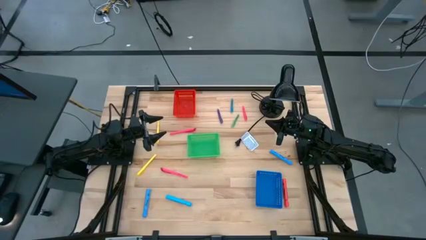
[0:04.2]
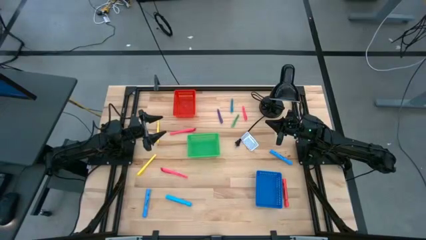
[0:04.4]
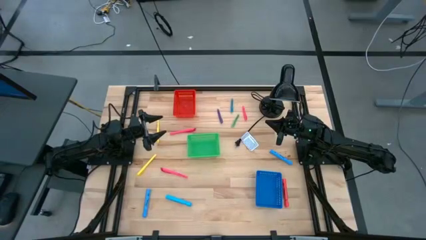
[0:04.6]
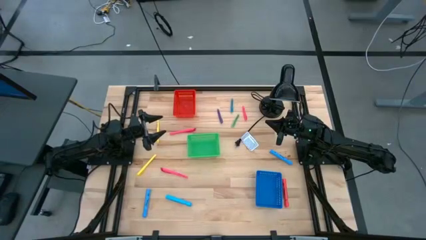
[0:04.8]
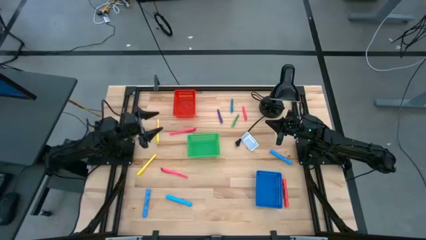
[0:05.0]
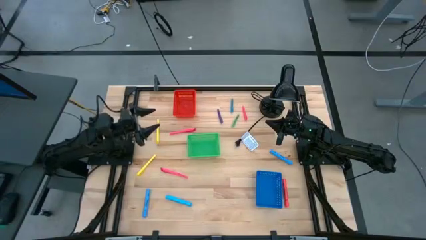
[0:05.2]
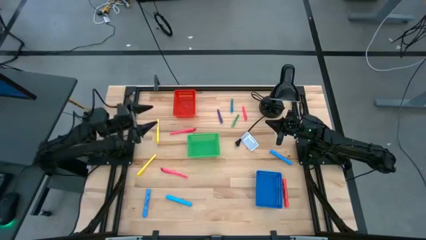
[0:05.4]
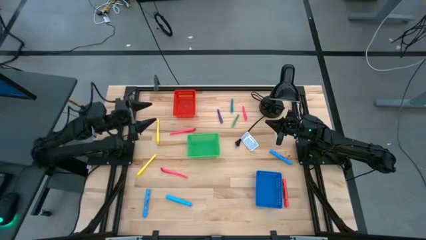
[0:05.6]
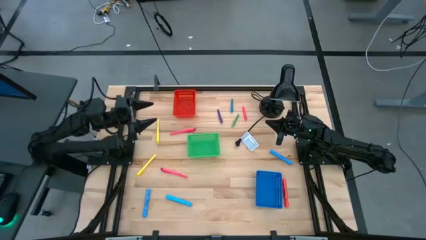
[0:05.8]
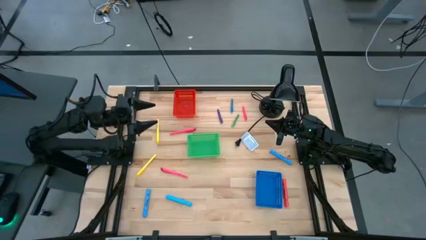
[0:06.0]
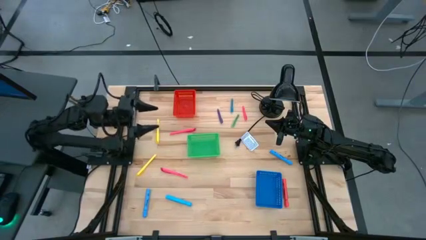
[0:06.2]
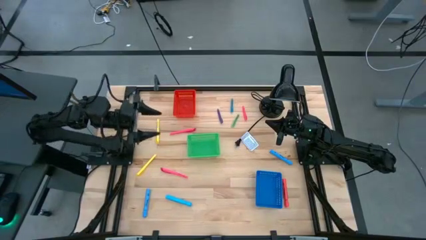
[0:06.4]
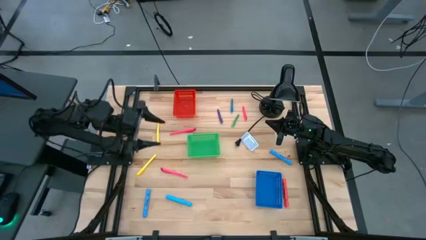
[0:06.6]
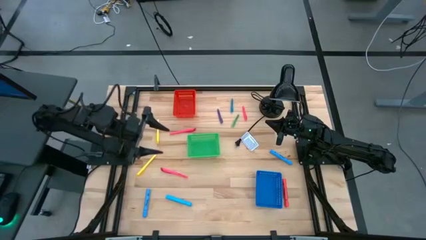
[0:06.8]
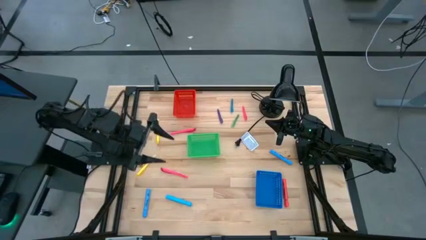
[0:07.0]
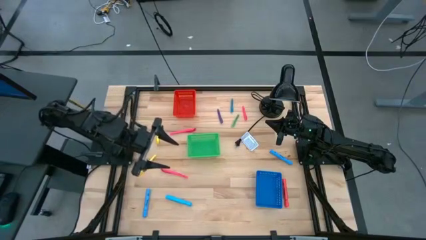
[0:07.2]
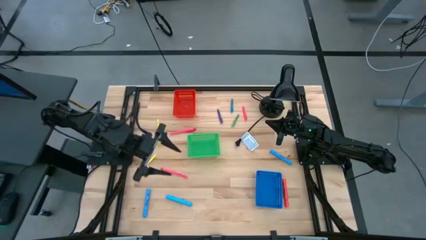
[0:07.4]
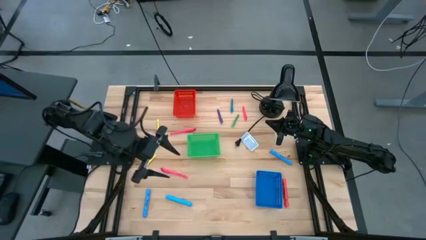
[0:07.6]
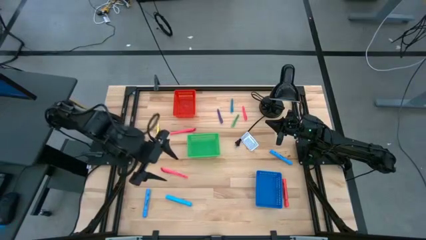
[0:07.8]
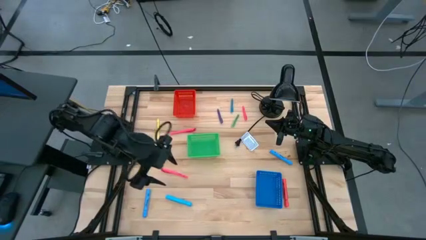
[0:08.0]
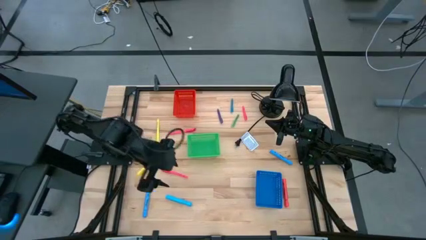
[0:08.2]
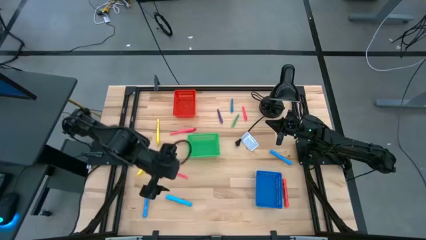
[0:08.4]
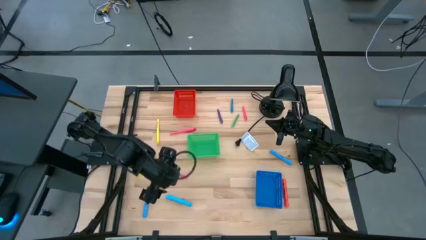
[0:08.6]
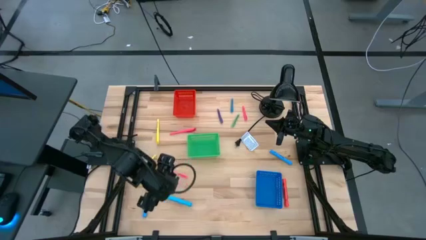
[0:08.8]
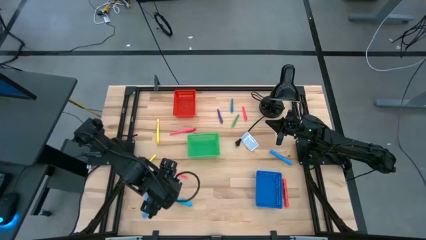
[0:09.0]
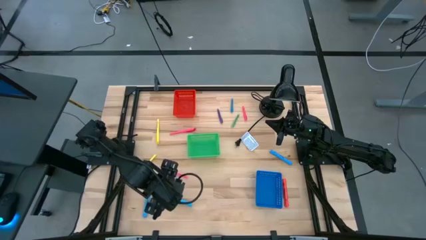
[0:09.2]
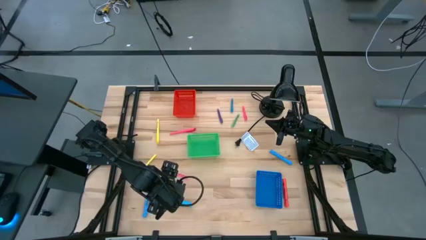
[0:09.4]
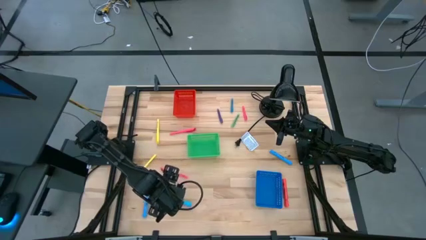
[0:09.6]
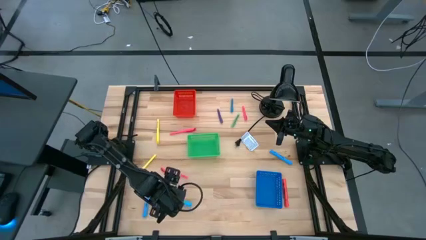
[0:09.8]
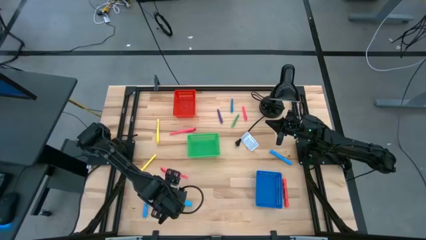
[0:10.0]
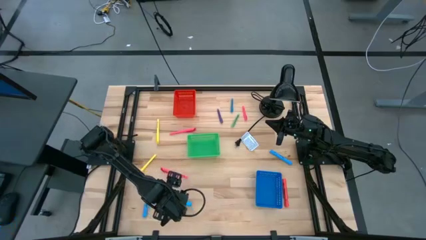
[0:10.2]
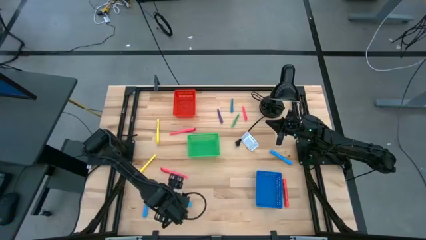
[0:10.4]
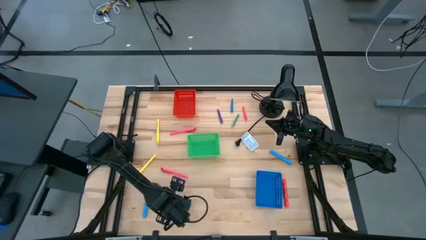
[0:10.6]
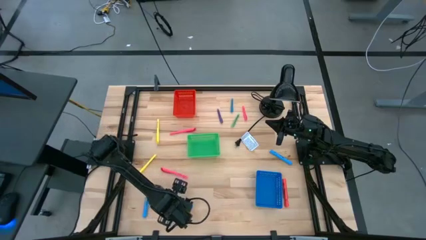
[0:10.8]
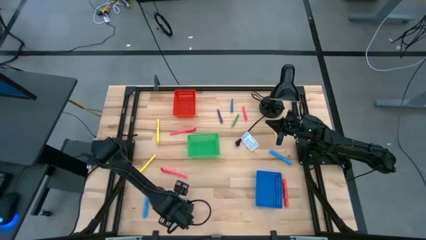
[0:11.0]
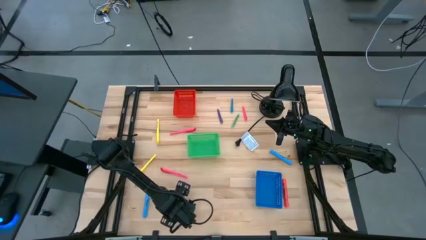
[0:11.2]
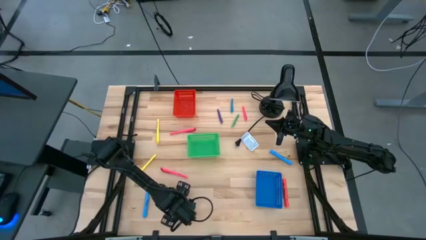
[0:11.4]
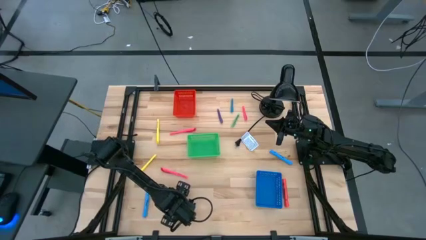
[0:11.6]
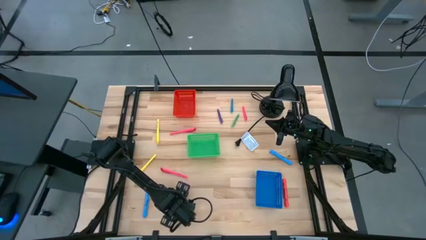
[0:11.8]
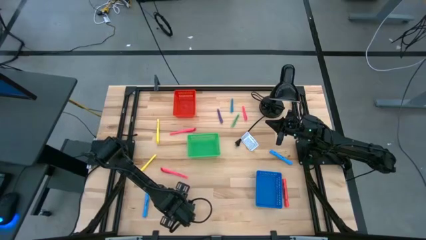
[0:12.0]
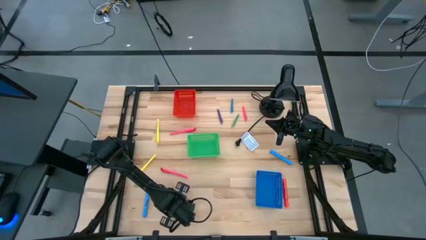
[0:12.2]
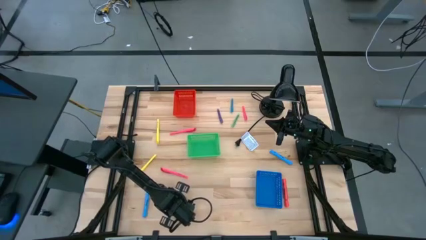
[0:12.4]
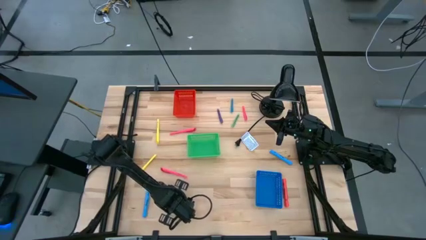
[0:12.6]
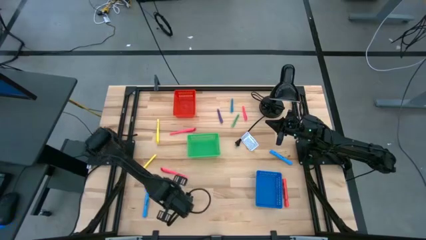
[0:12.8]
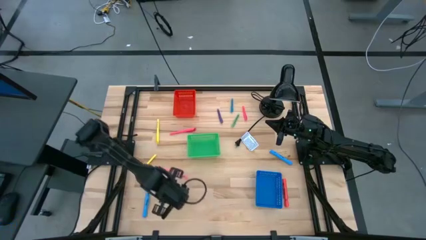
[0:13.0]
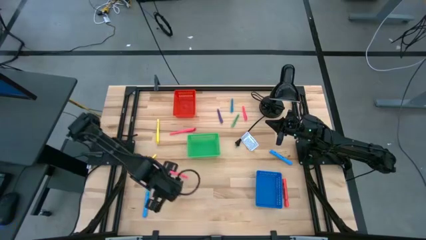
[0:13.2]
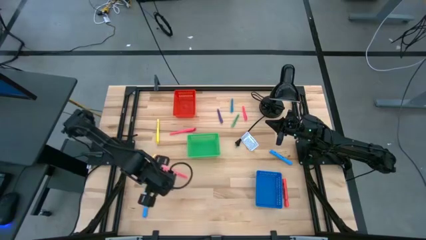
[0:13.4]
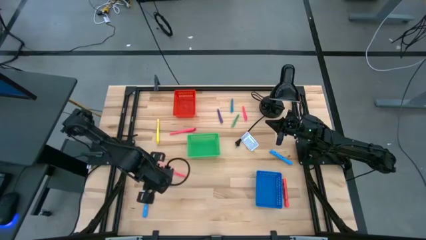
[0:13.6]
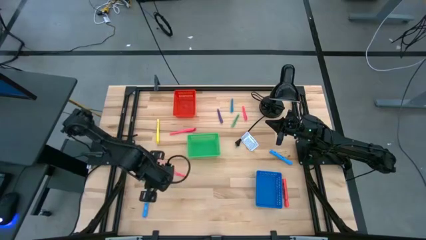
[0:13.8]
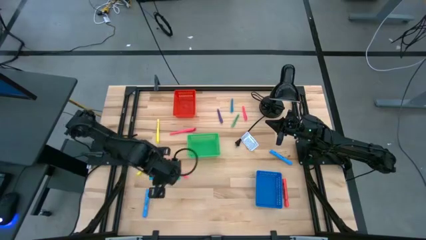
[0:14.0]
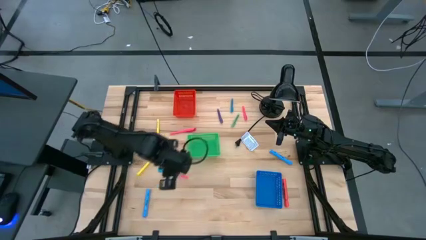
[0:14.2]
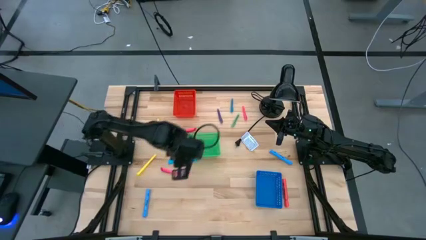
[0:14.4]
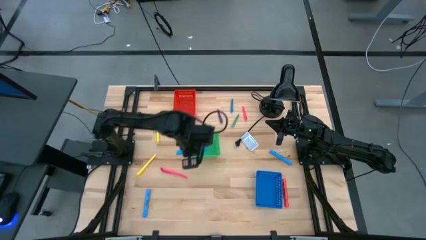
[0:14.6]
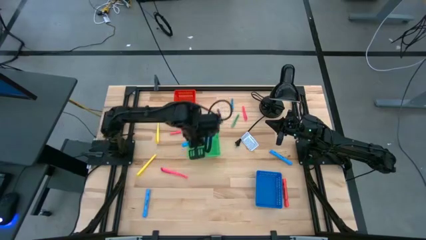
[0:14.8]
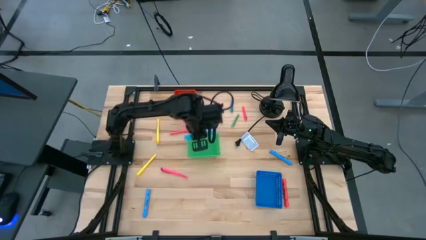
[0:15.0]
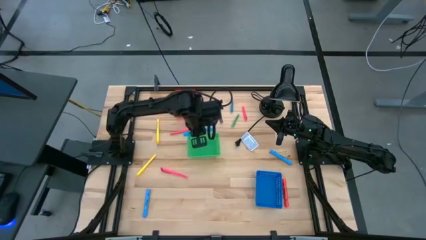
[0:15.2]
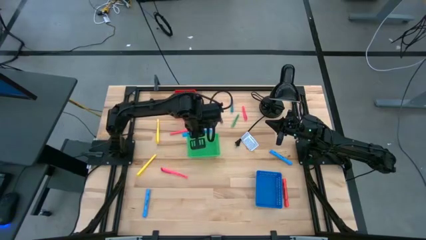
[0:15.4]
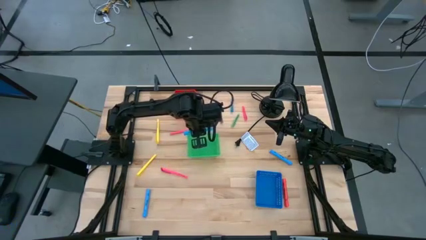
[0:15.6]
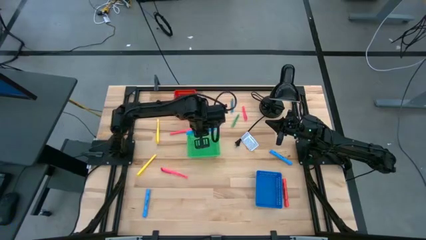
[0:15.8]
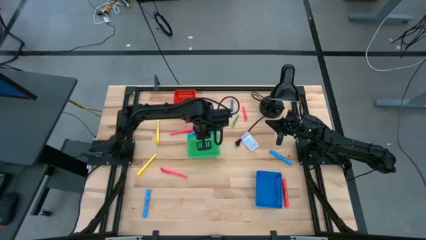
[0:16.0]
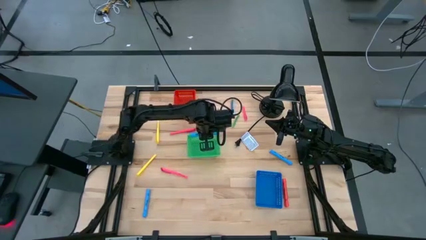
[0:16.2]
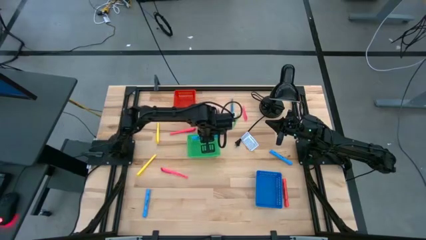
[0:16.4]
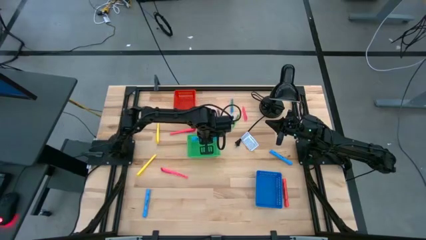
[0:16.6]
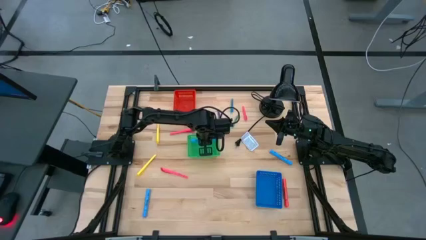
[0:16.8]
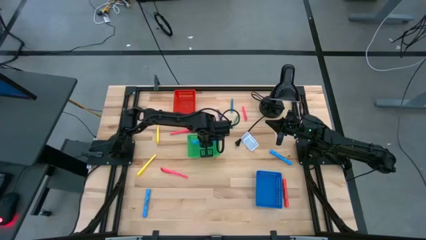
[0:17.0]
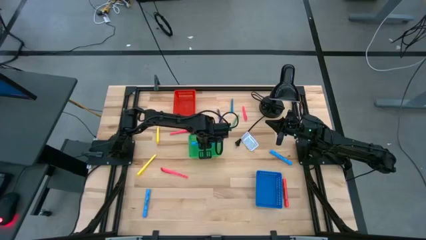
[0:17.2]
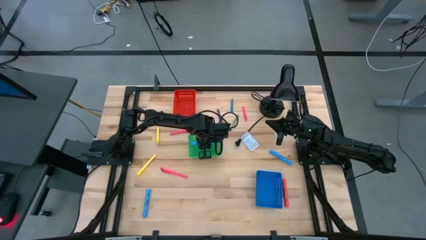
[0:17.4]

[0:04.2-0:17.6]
Task: Pick & Place Markers
Put the bottom left blue highlighter pen into the green bin
